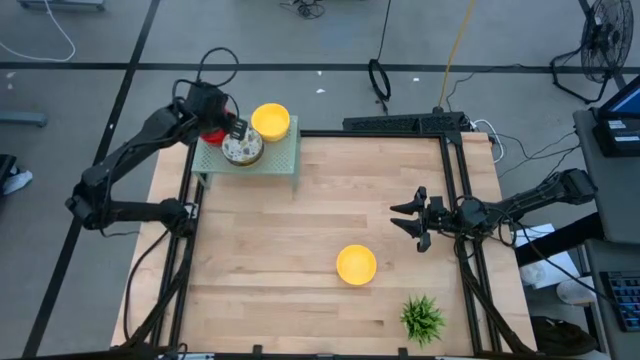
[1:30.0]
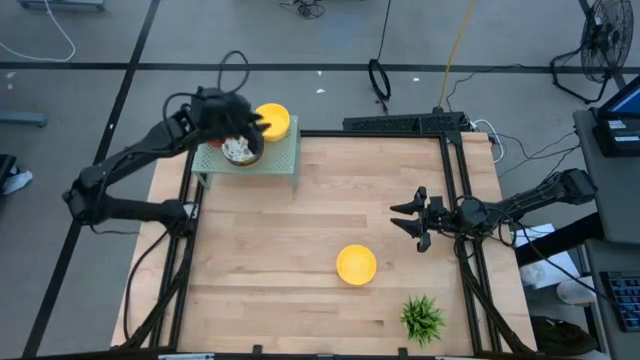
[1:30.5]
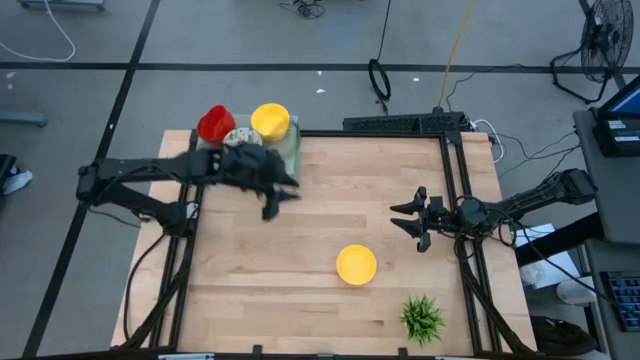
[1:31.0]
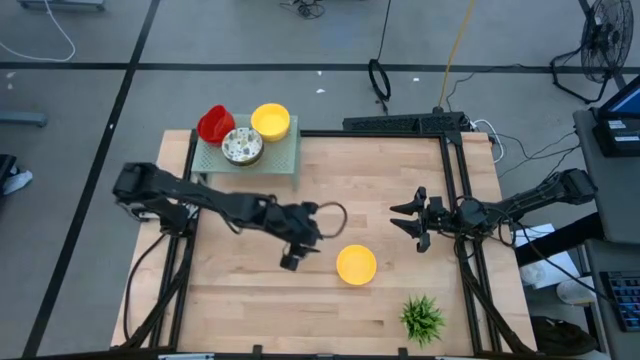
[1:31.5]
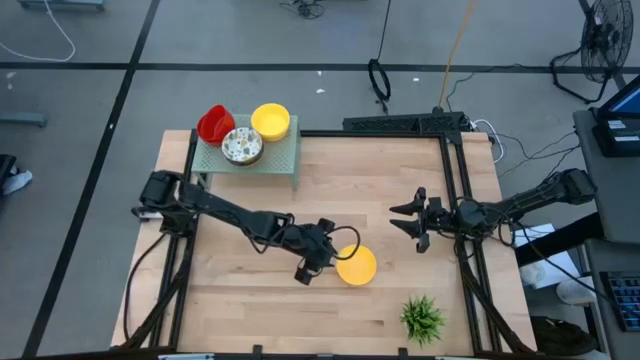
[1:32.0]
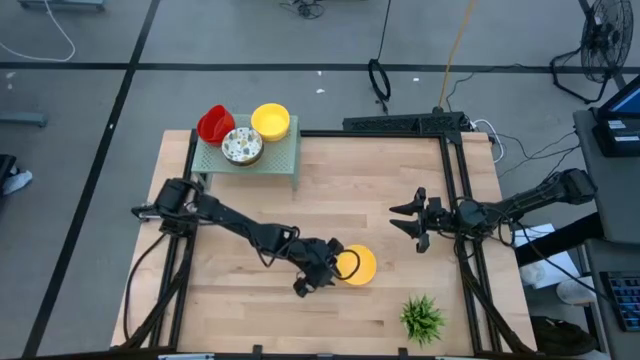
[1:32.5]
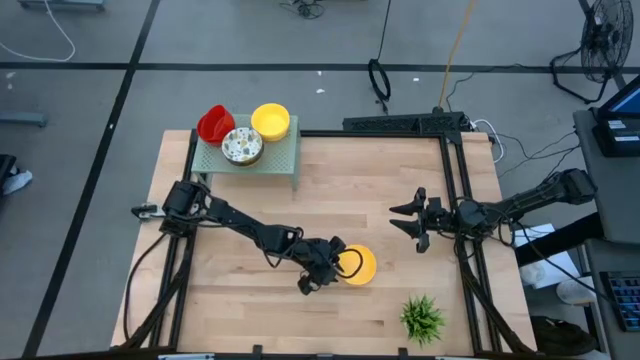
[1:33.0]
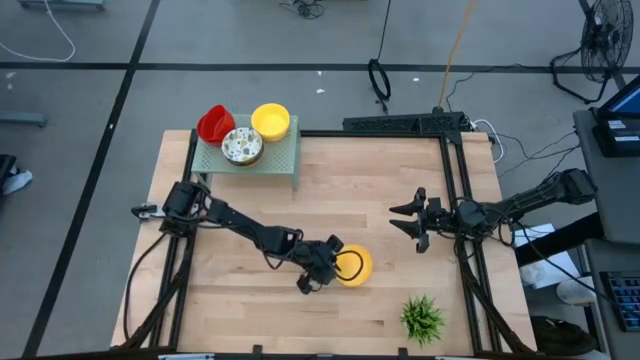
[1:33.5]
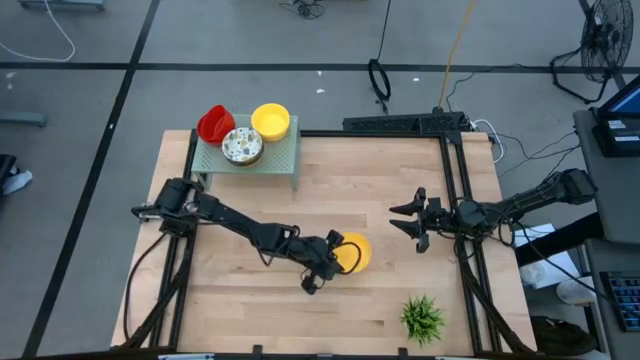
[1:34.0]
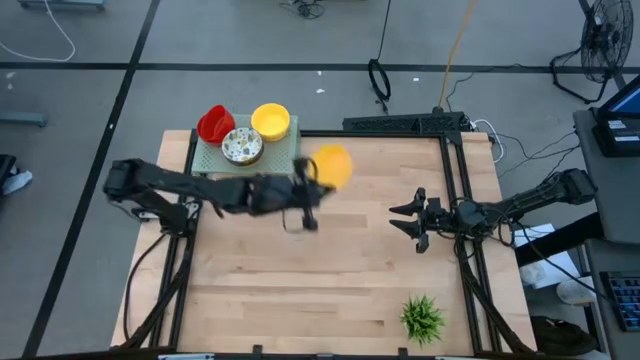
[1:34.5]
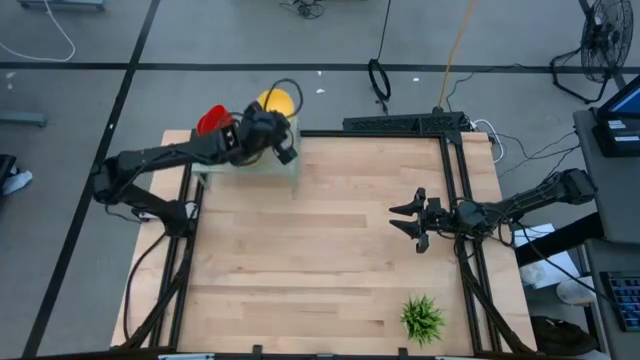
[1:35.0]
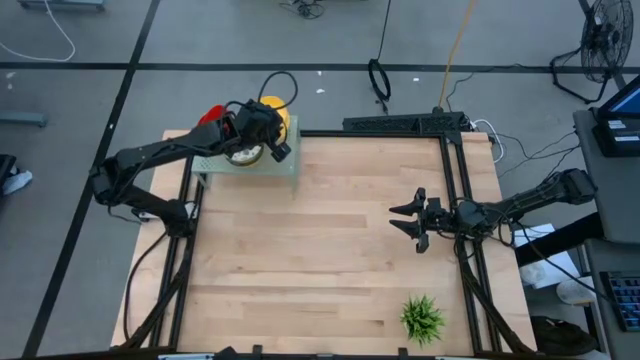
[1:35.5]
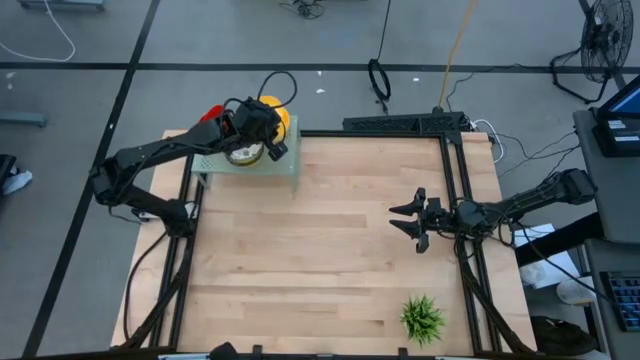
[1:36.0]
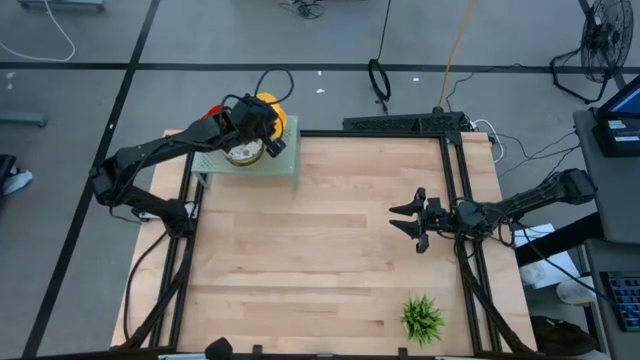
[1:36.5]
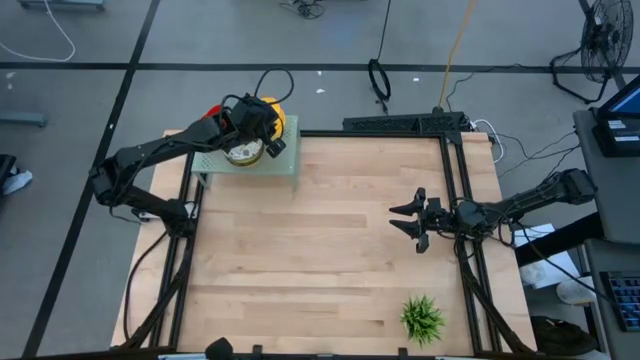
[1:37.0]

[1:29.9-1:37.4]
Task: Pick & Place Mini bowls
Stack the yellow bowl on top of the yellow bowls on the shelf

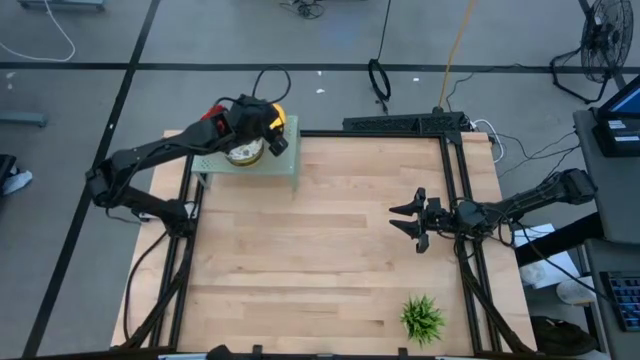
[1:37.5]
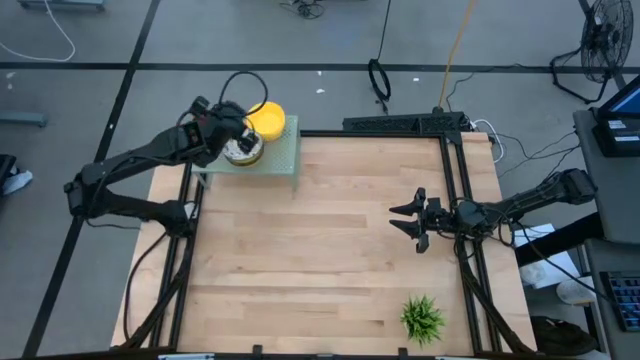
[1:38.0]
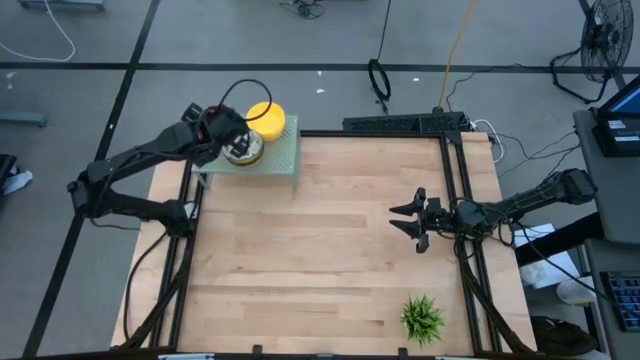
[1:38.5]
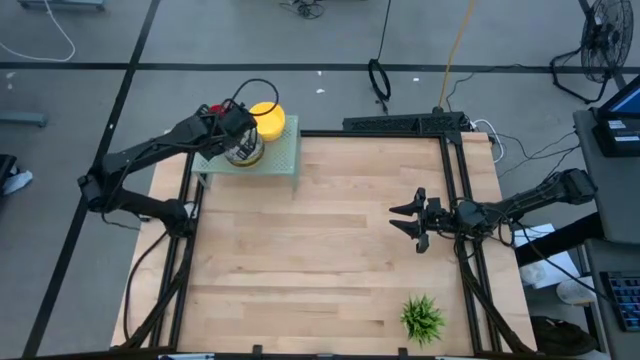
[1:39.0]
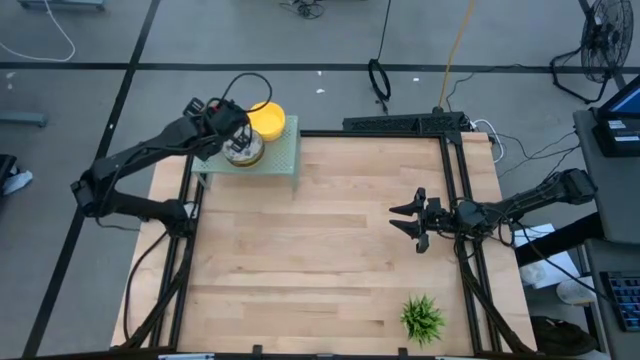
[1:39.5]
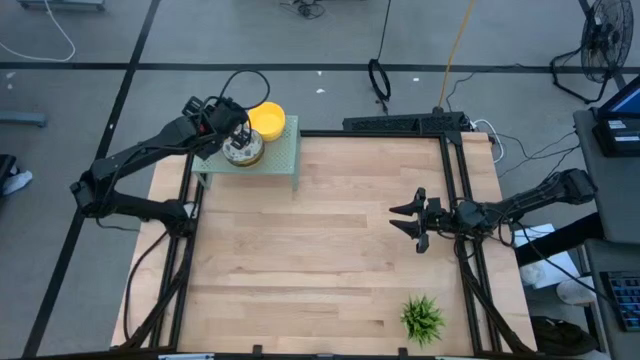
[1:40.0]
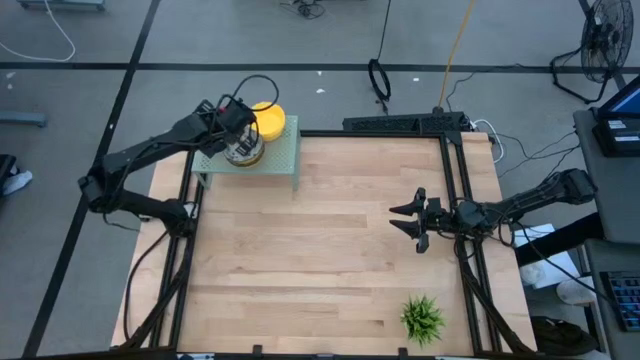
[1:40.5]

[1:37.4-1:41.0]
Adjust the red bowls on the shelf

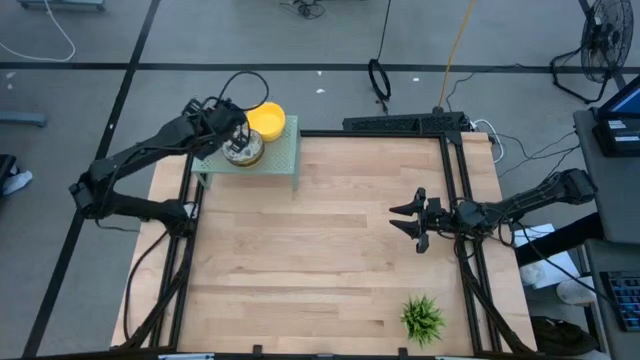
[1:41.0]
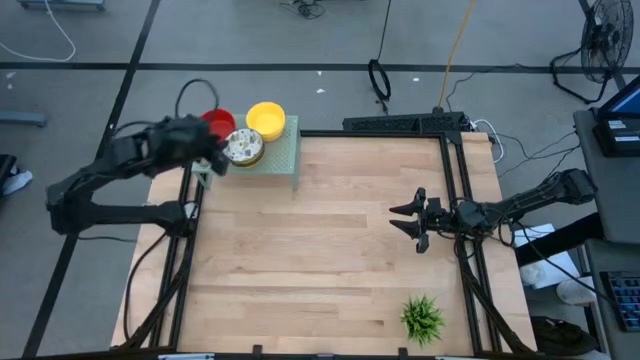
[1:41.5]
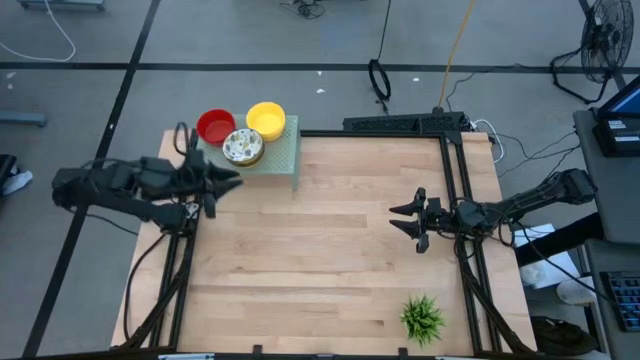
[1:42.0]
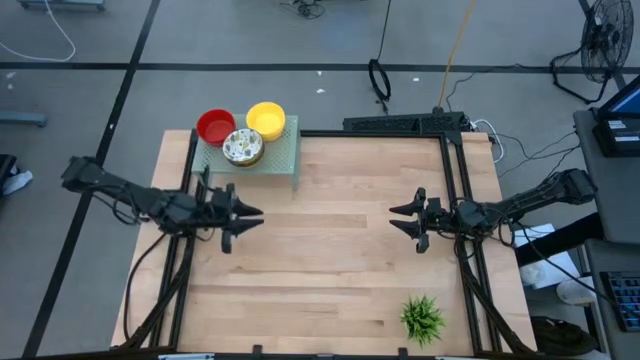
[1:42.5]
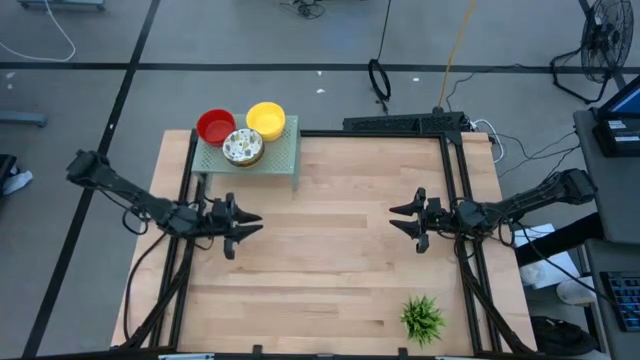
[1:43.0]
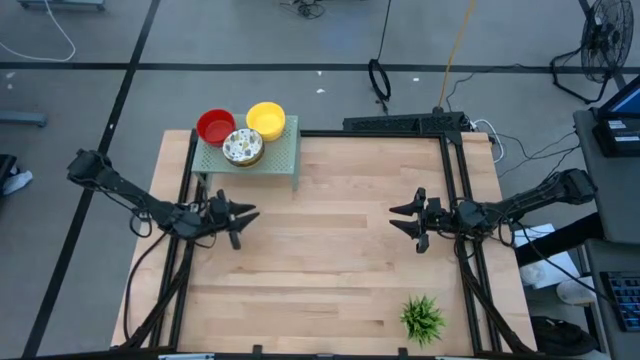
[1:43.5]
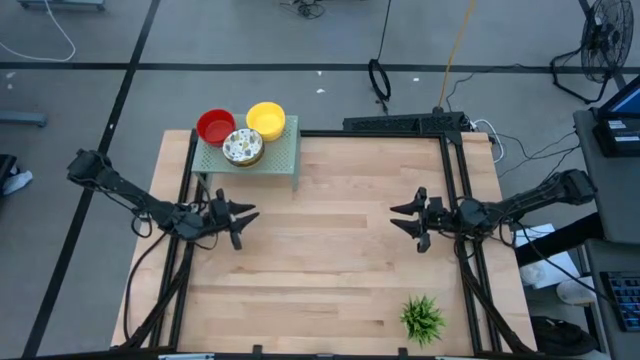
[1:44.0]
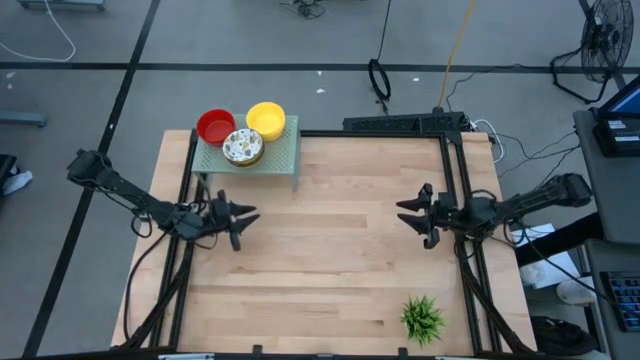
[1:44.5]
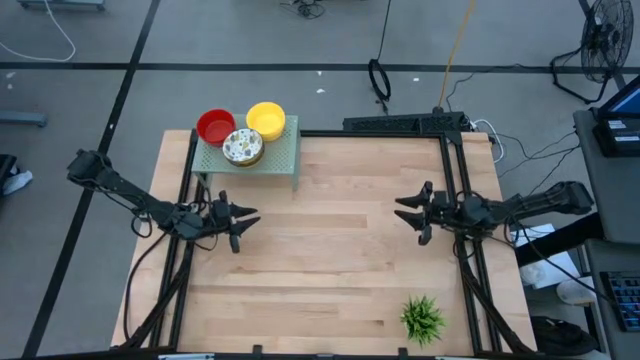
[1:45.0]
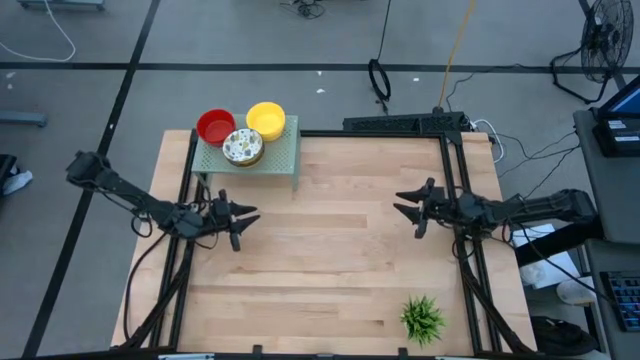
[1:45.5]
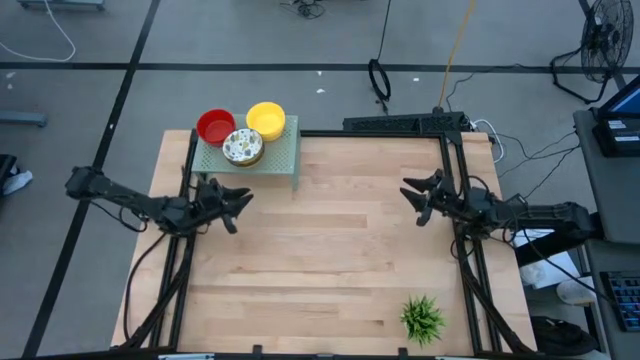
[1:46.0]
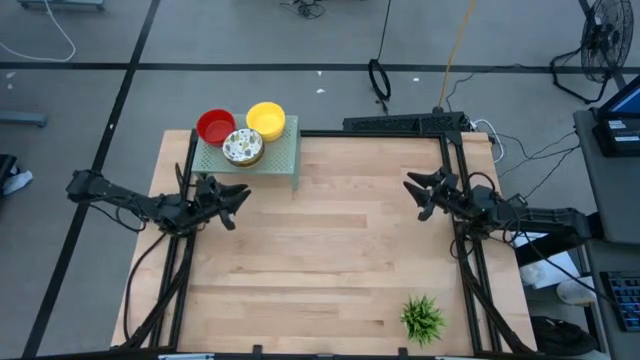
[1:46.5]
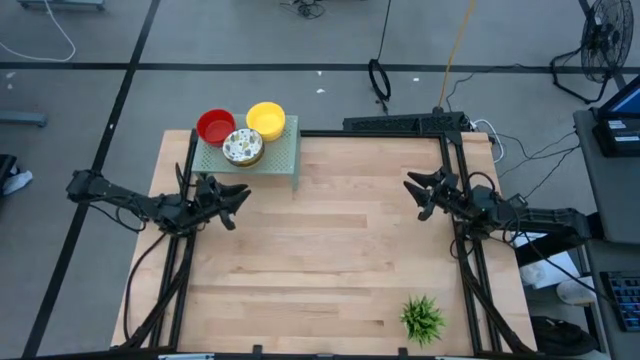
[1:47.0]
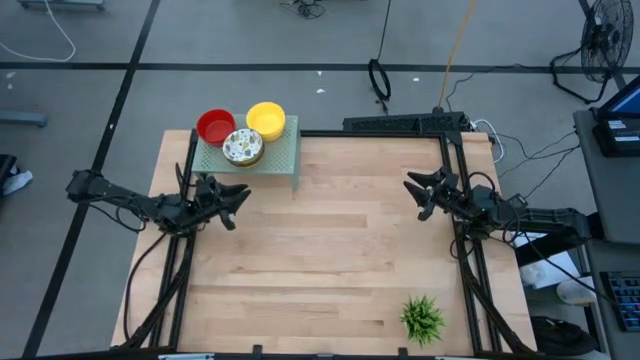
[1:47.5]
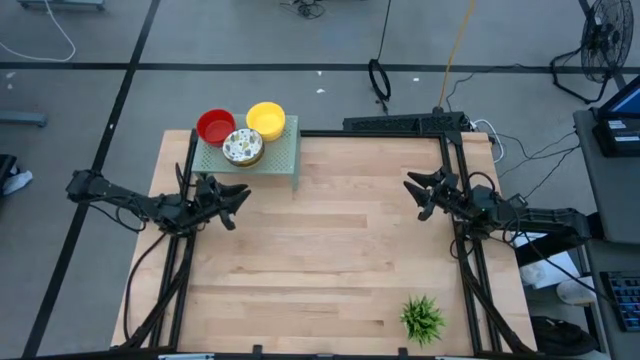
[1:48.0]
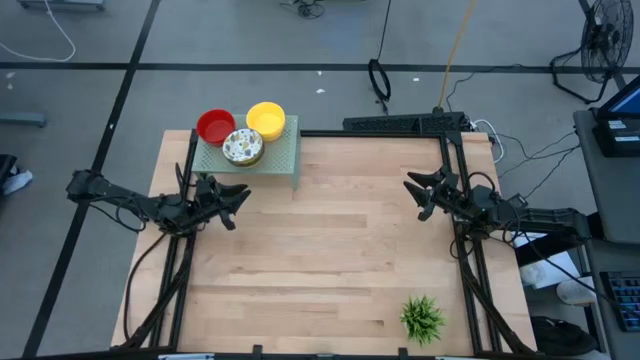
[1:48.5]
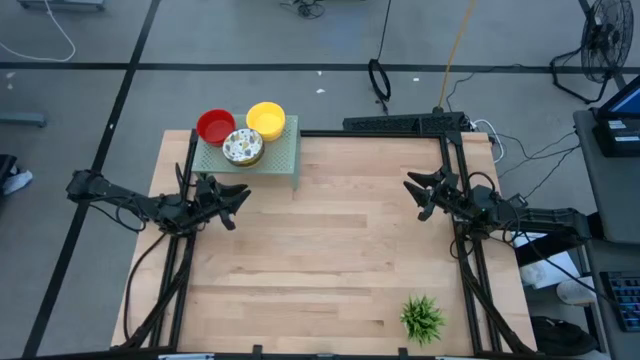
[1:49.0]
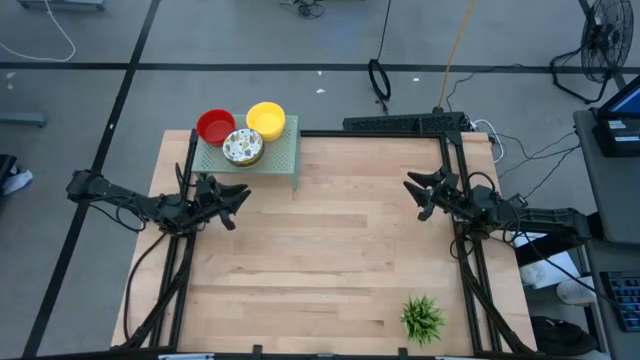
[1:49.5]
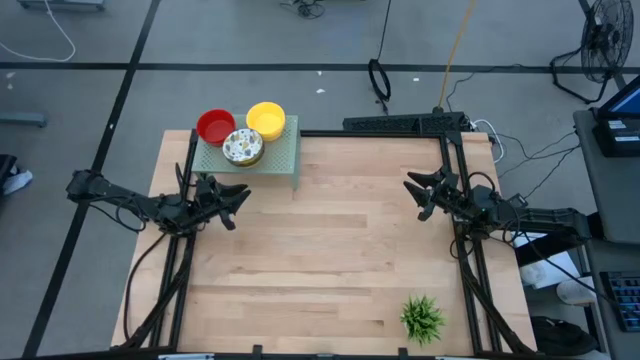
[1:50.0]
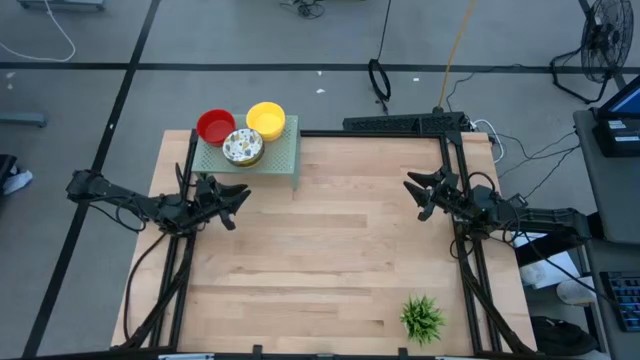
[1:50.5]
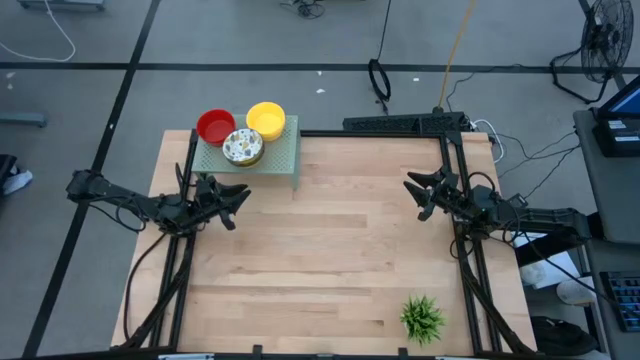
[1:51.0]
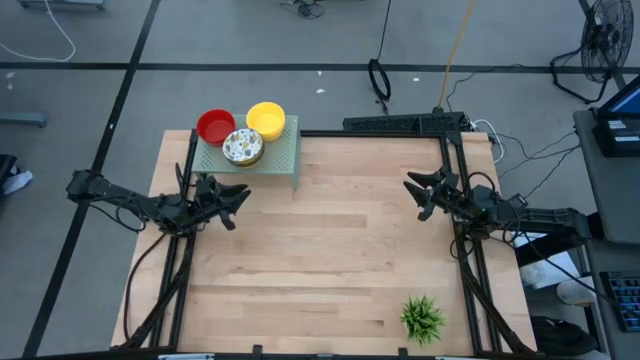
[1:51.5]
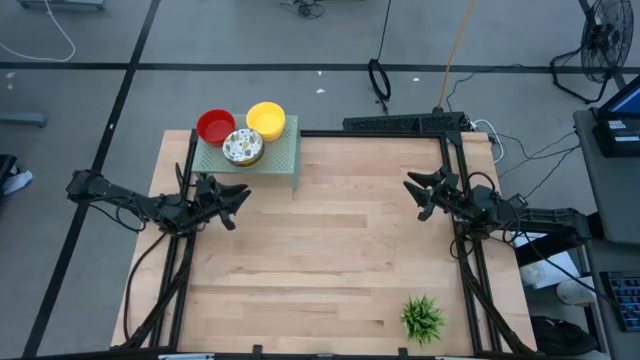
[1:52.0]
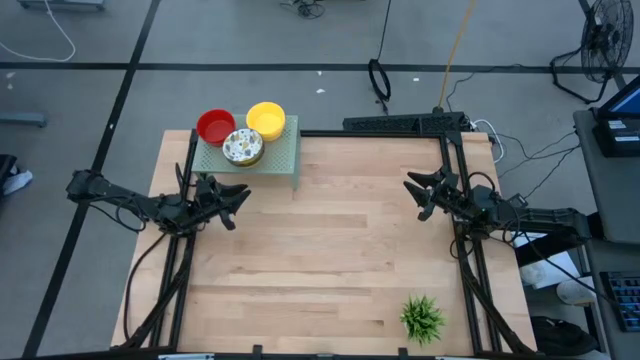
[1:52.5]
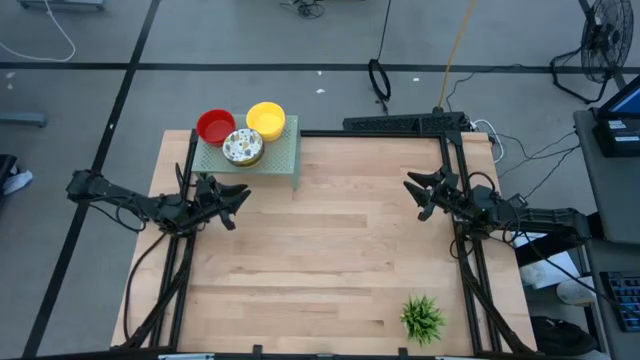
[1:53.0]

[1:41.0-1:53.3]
Return to Home Position
